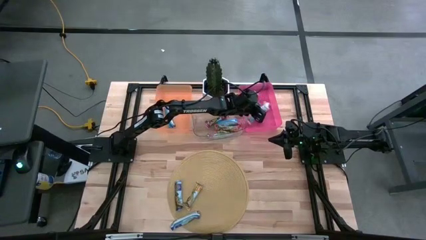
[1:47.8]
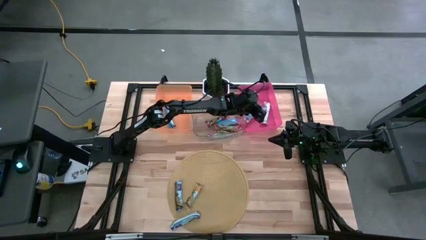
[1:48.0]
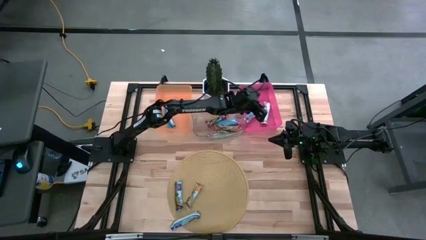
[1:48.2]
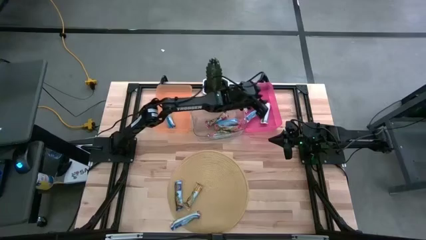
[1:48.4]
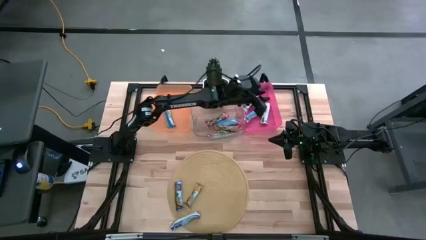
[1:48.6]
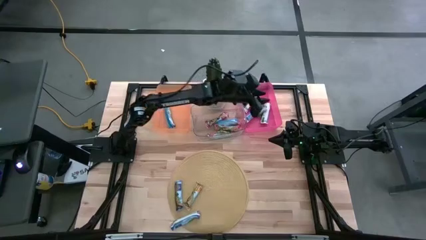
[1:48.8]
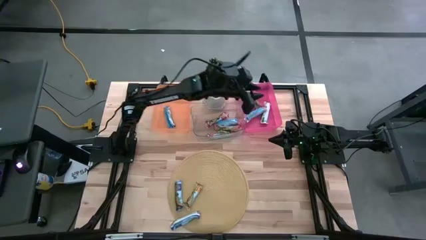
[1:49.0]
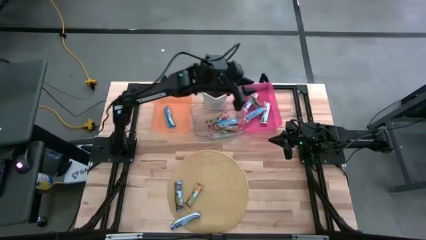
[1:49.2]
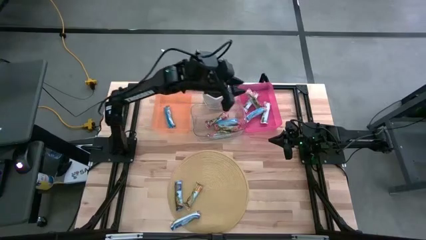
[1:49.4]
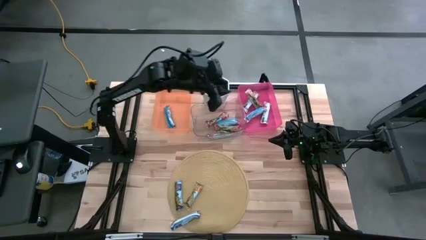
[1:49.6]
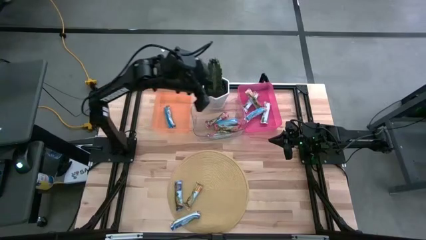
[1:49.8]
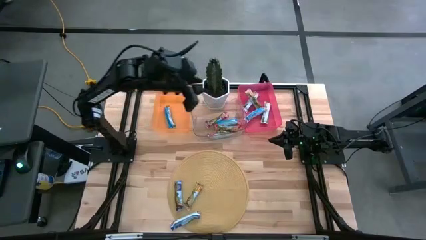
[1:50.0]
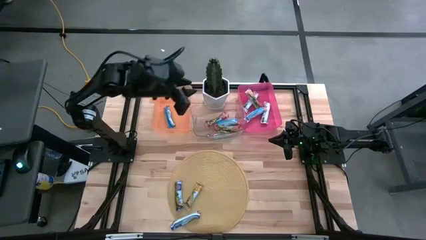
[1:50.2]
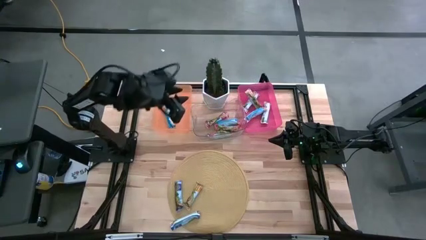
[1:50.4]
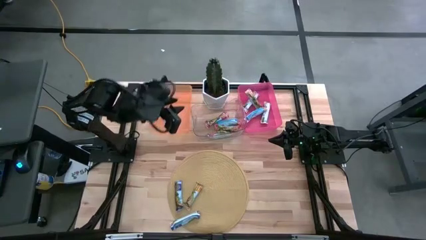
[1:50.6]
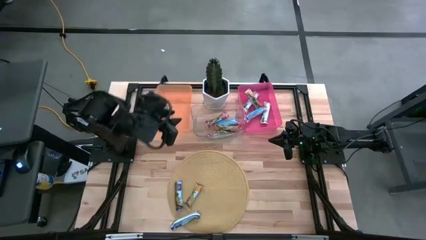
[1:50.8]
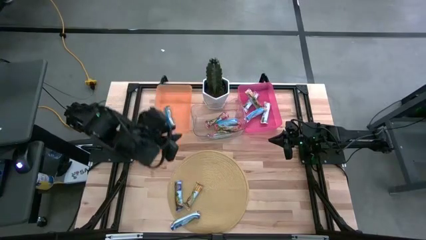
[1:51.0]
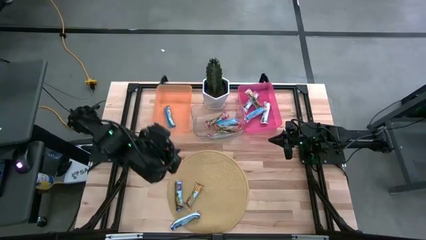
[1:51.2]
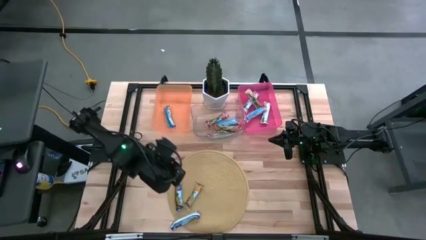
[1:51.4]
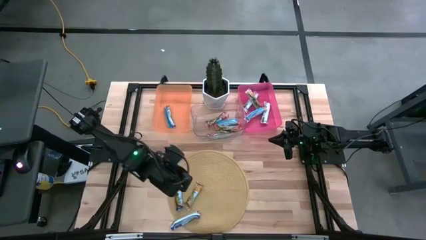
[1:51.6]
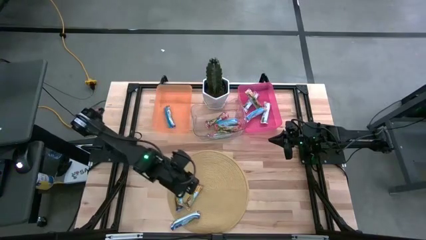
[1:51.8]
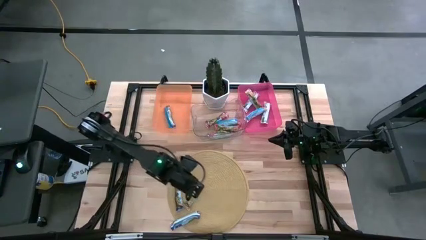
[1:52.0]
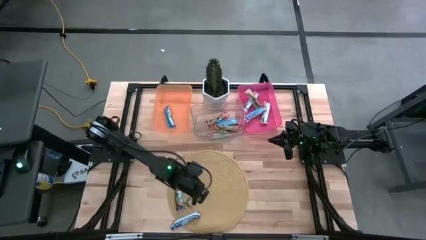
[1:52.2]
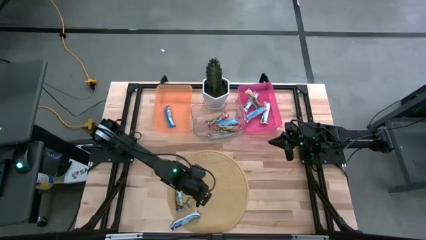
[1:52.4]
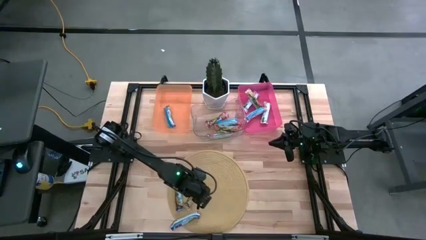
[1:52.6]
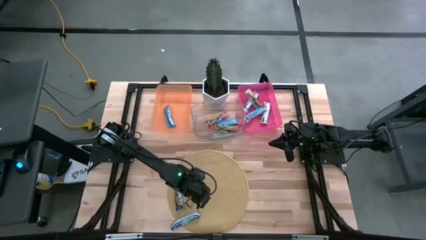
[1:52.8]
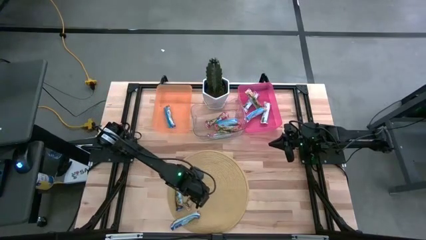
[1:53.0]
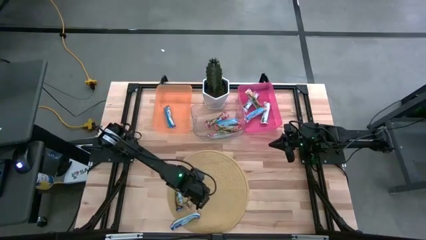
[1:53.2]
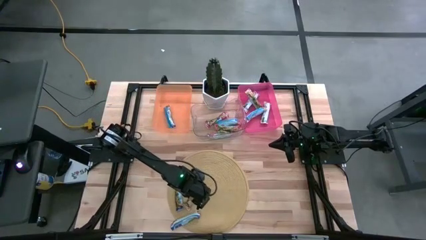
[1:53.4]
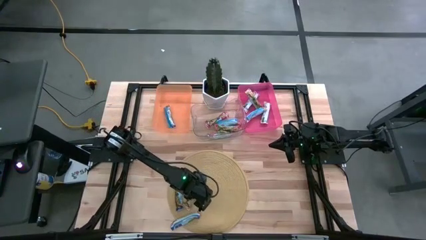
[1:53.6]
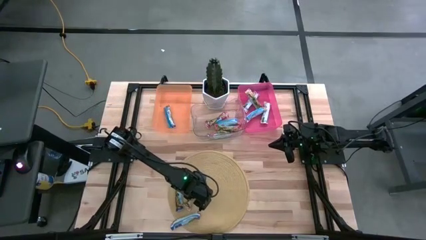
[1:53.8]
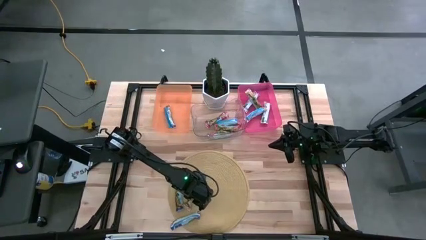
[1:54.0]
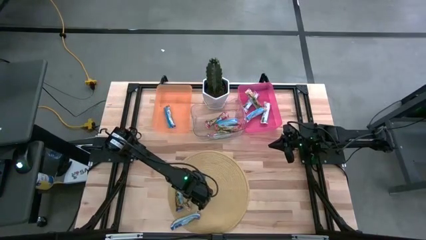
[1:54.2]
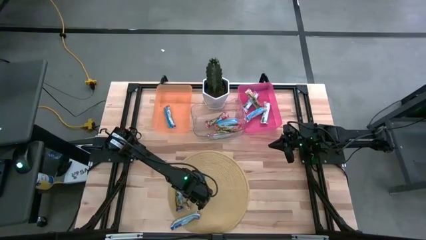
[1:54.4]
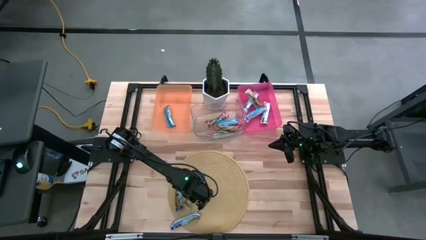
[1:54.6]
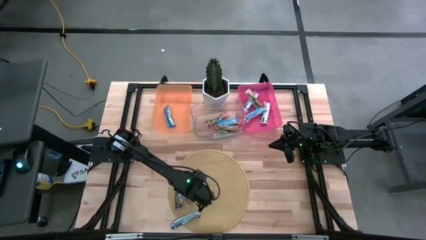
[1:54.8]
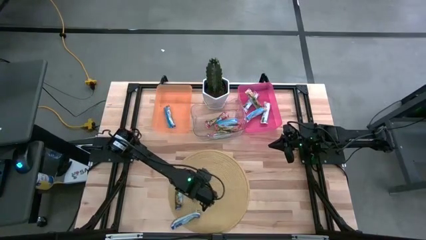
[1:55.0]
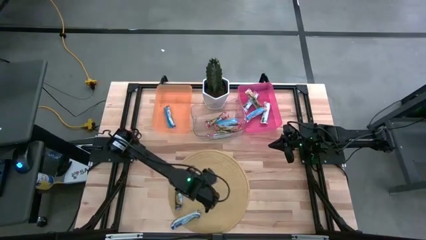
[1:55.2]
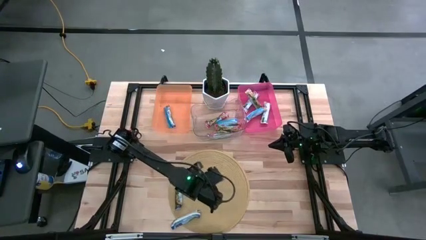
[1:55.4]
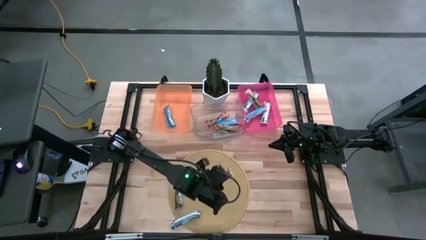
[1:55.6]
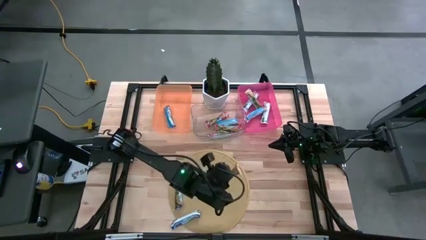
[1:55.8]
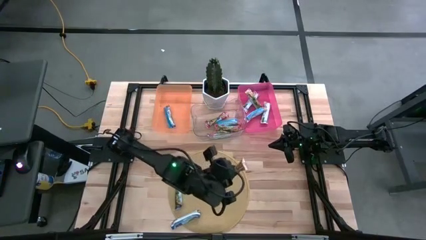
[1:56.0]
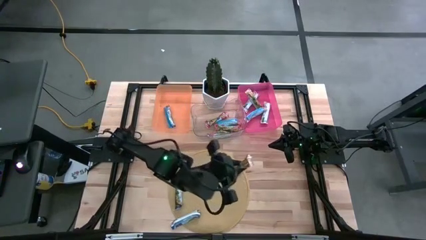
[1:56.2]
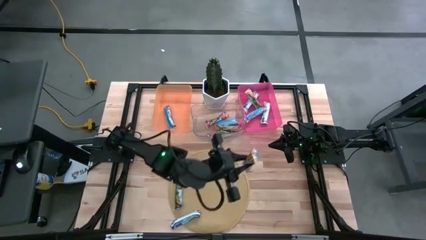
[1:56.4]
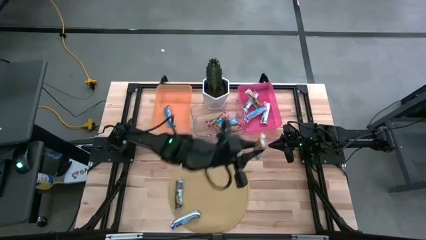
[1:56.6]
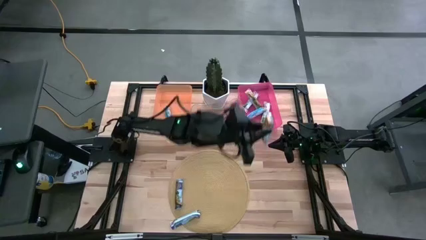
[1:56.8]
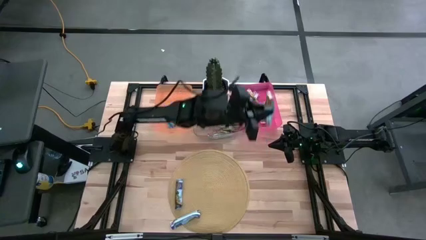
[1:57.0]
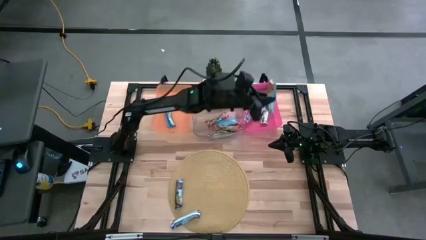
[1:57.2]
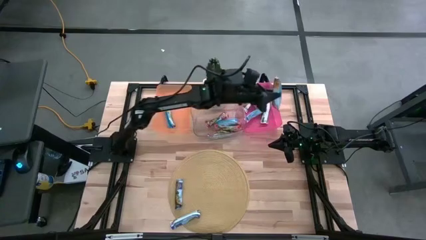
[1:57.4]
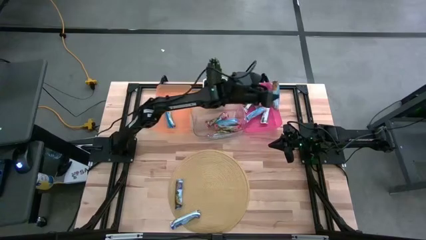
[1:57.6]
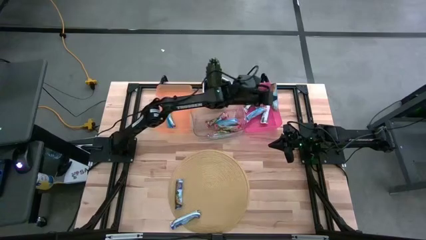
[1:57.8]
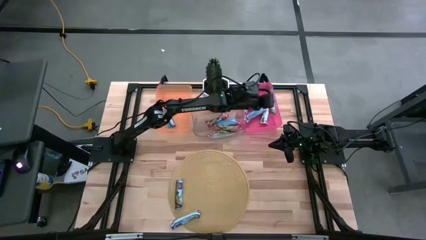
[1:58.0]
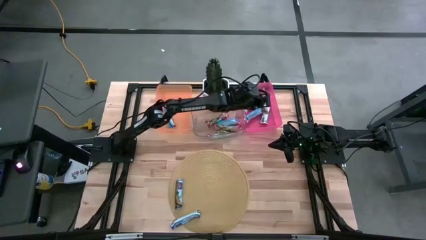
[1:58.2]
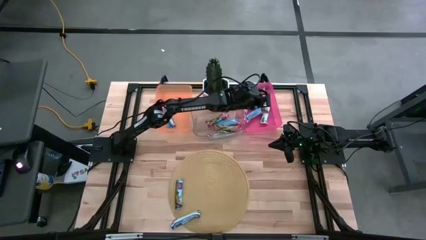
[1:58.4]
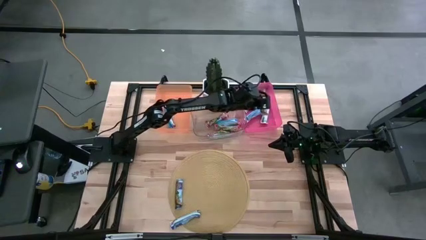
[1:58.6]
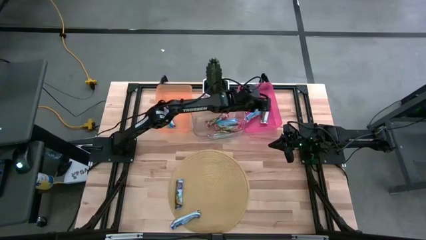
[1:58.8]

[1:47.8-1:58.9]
Task: Pick and place Granola Bars by type
Put the yellow granola bar into the red bin

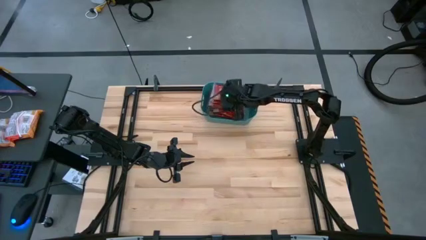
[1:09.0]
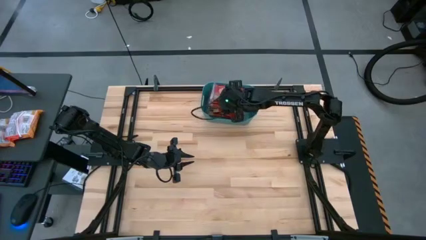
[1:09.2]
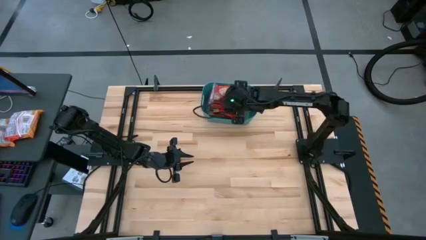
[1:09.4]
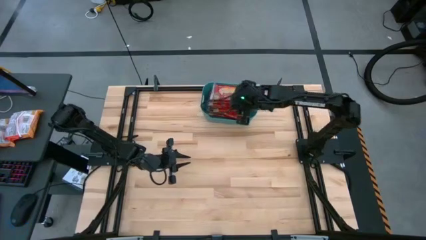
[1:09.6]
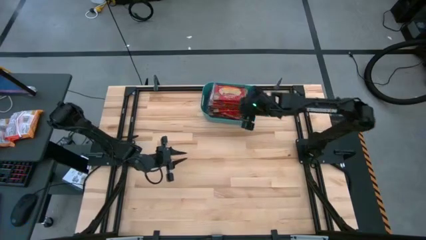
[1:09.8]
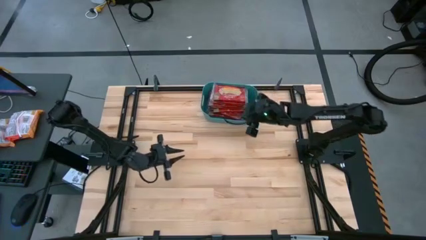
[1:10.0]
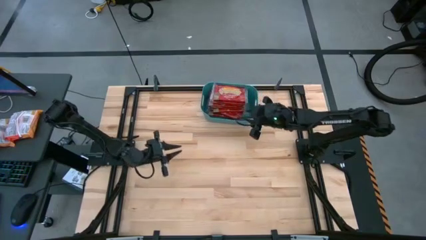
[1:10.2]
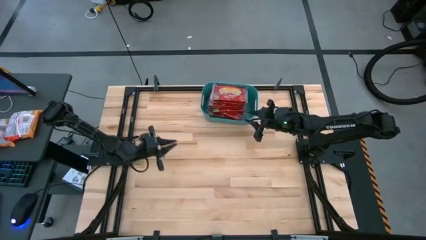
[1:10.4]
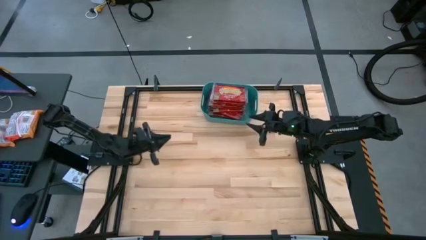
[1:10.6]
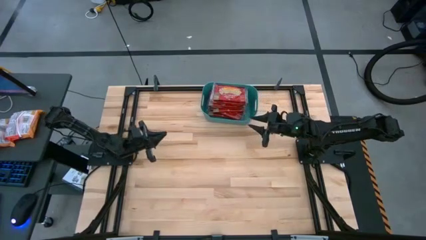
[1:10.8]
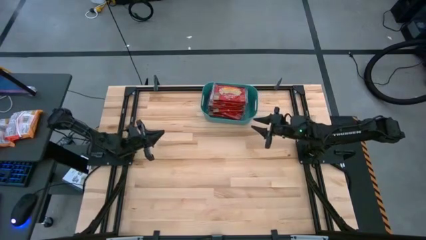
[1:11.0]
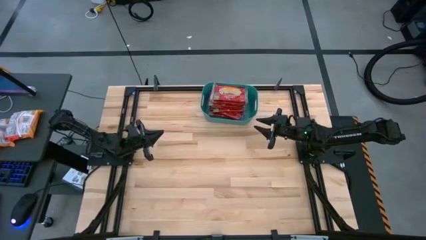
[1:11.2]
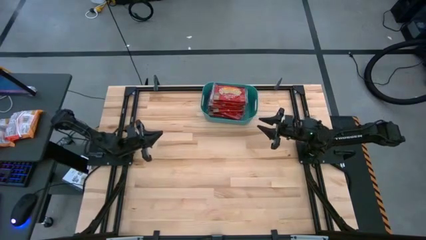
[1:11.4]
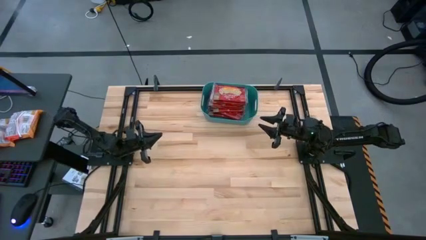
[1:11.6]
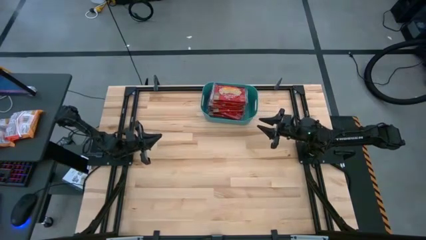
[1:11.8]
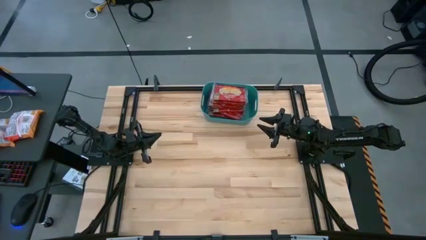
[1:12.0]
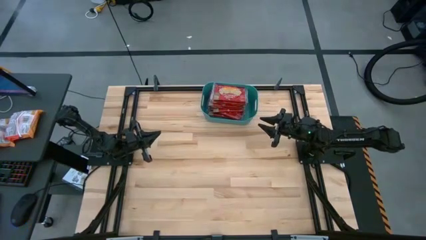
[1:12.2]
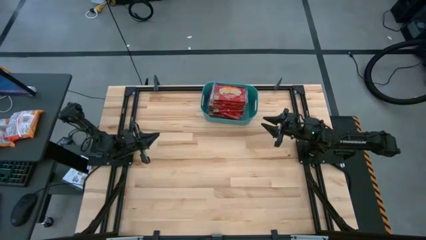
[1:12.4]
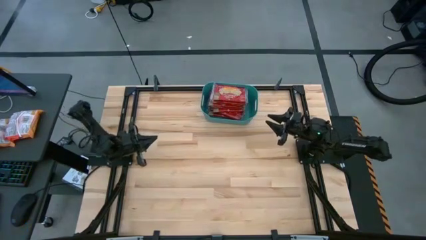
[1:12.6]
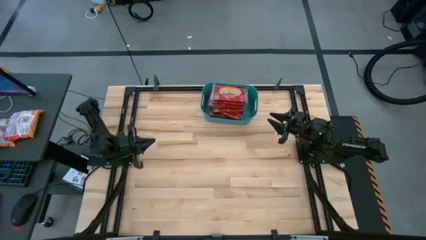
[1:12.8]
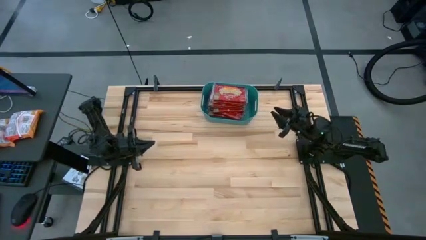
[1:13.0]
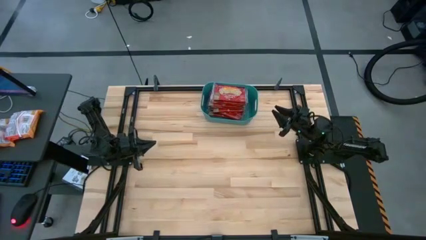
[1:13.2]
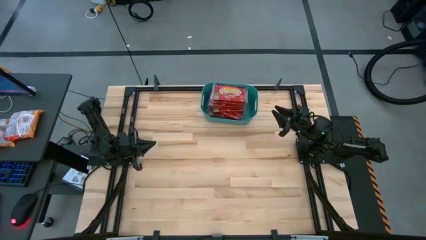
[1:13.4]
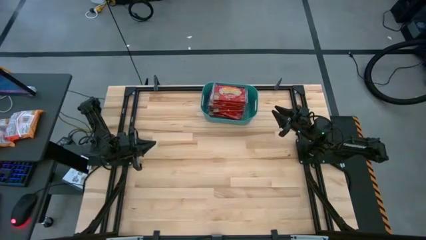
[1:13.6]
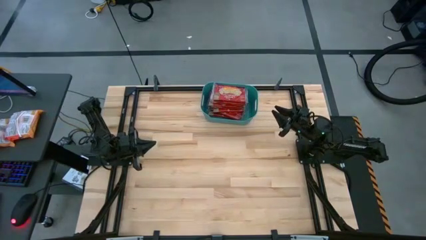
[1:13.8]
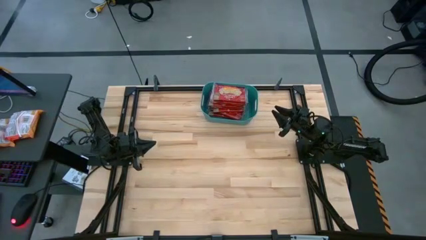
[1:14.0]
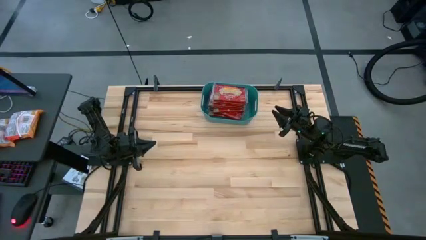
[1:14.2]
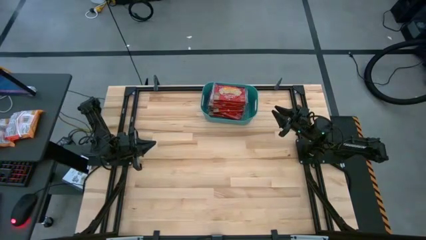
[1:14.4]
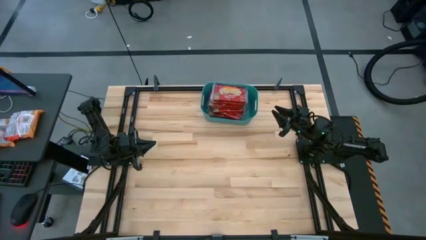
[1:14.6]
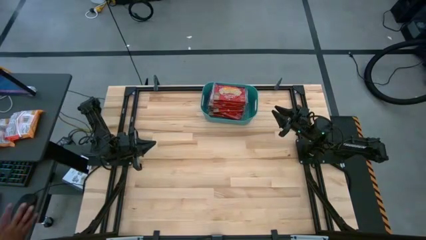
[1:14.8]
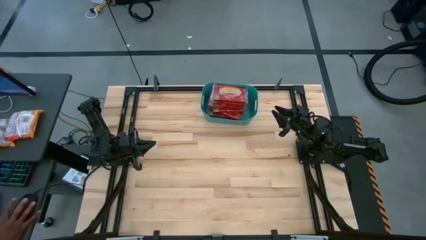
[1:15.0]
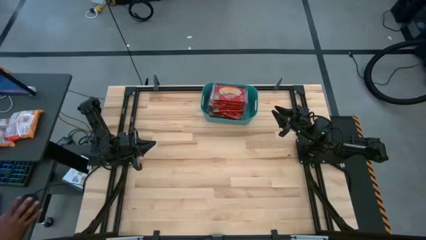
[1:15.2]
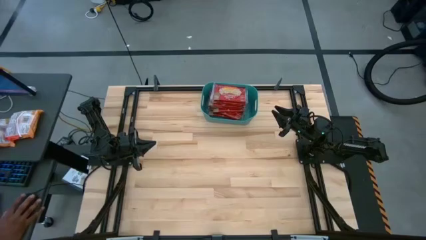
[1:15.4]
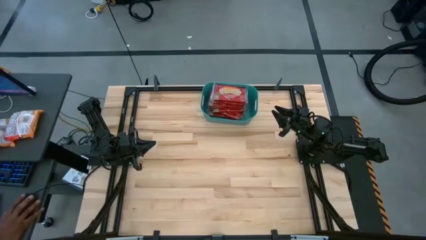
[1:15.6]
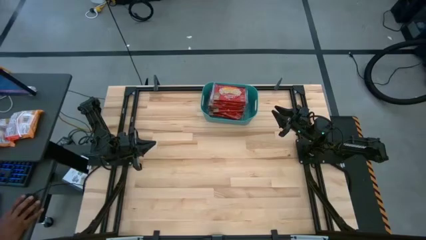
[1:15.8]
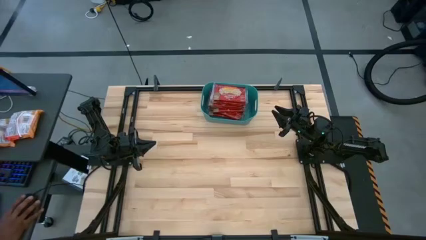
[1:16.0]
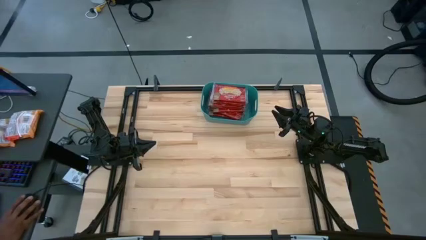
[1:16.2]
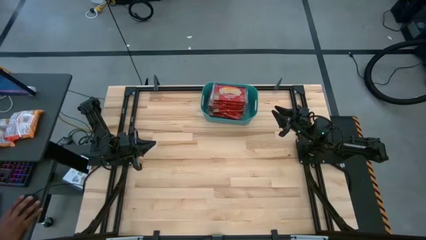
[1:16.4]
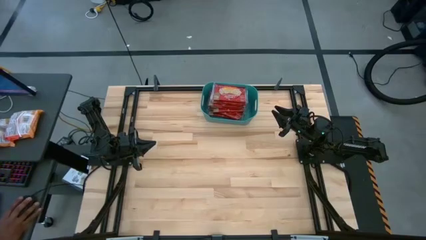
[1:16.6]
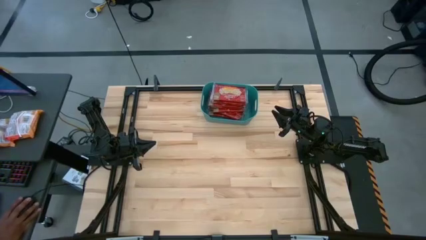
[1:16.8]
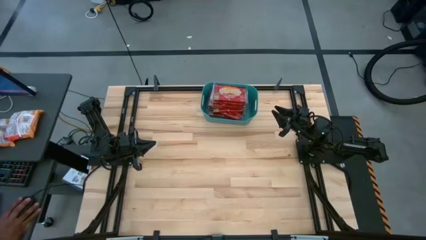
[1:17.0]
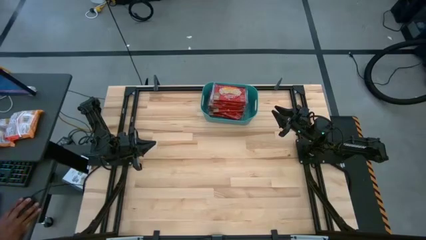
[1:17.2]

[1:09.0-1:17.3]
Task: Sort popcorn bags into baskets
Return to Home Position
